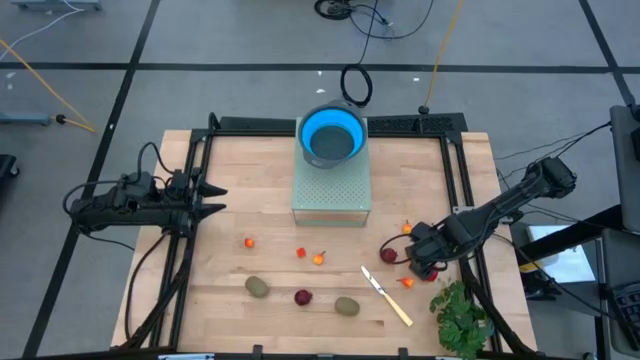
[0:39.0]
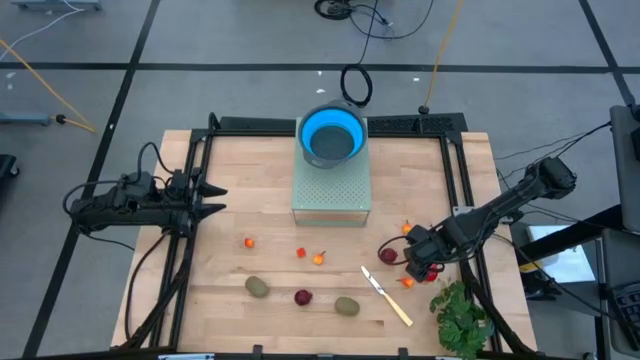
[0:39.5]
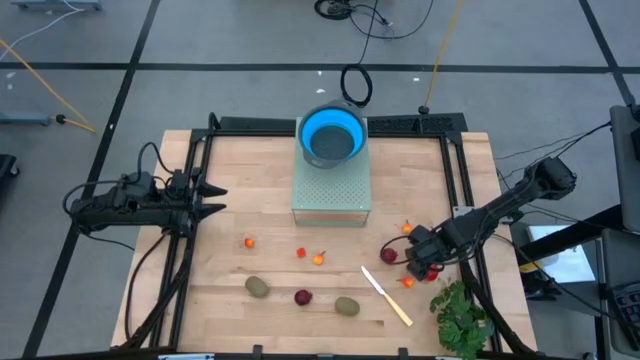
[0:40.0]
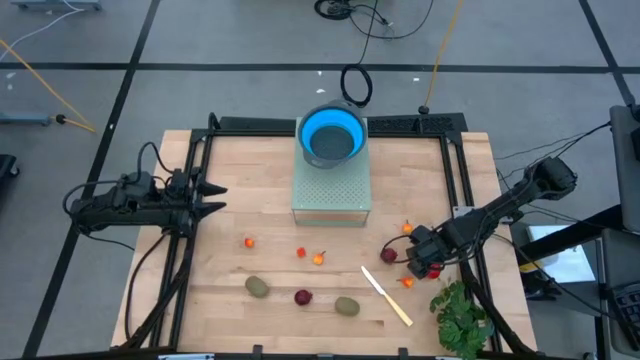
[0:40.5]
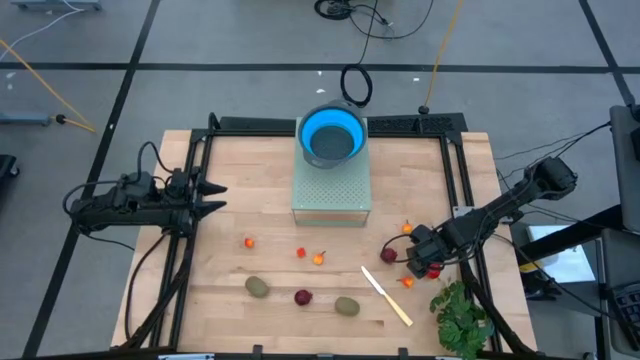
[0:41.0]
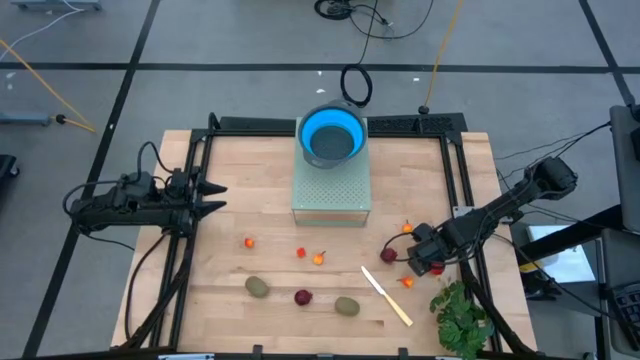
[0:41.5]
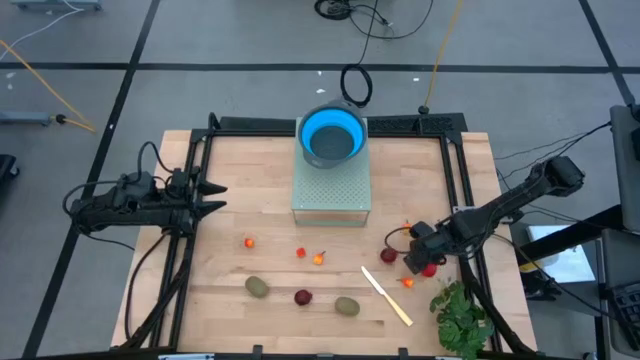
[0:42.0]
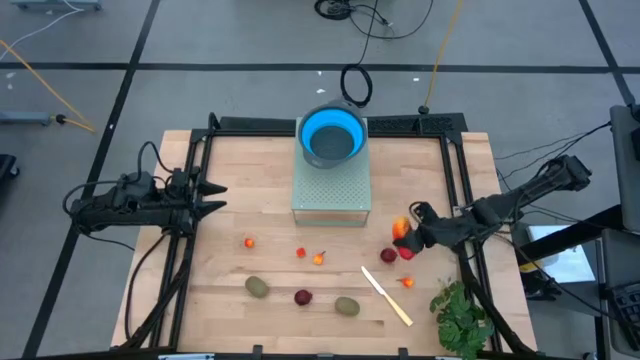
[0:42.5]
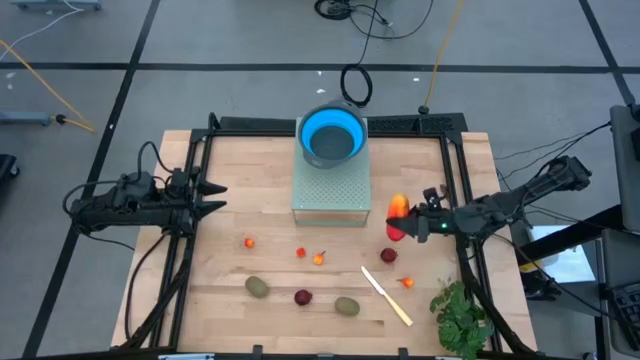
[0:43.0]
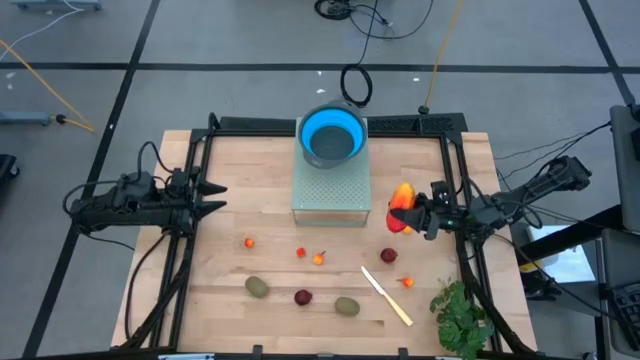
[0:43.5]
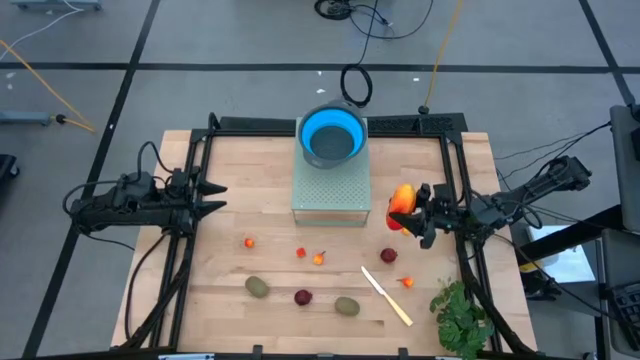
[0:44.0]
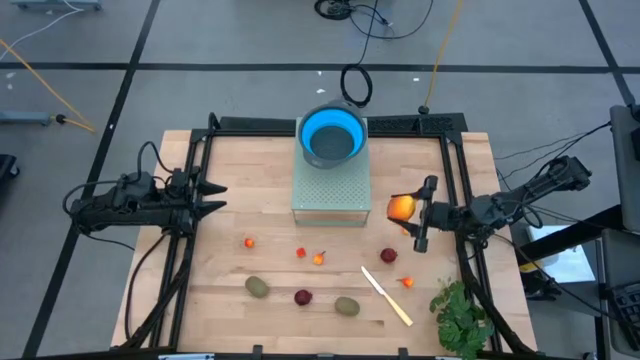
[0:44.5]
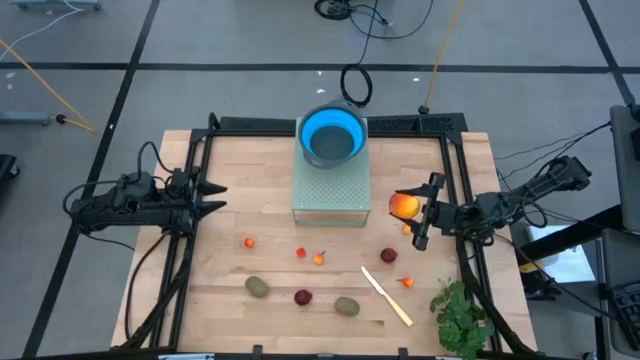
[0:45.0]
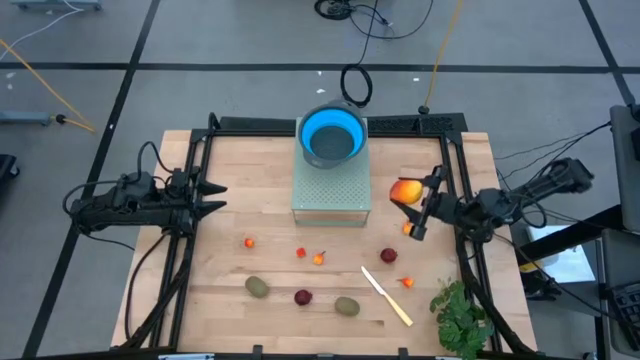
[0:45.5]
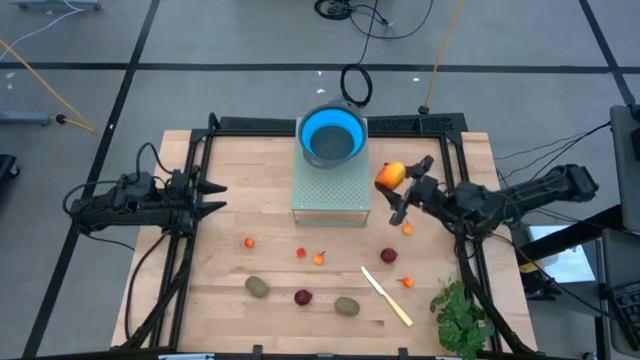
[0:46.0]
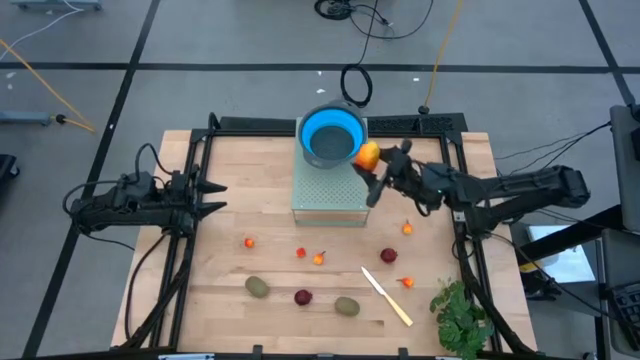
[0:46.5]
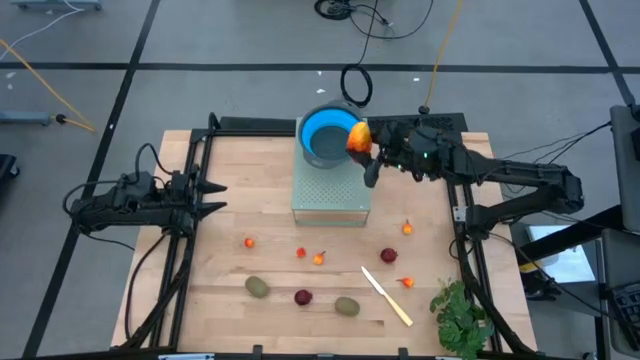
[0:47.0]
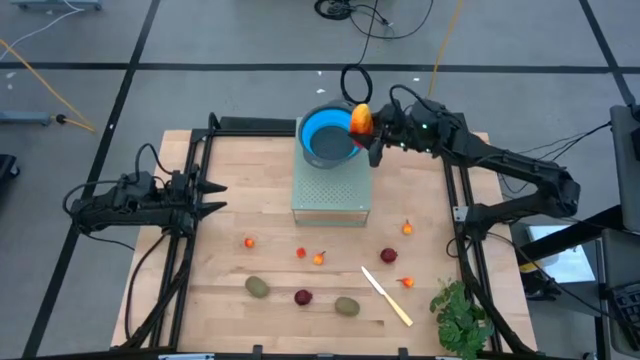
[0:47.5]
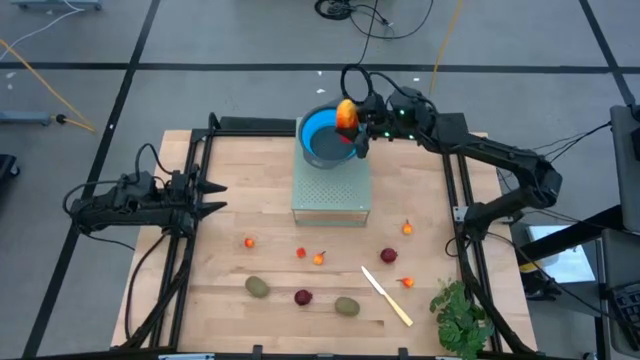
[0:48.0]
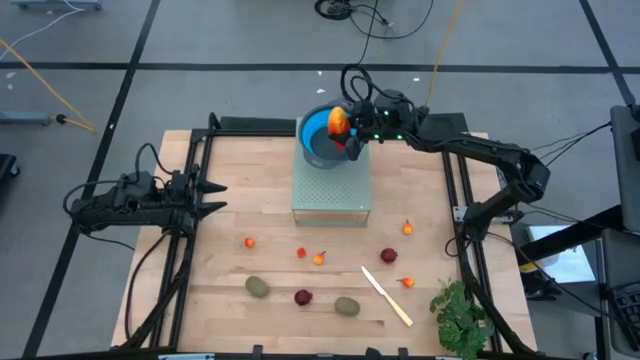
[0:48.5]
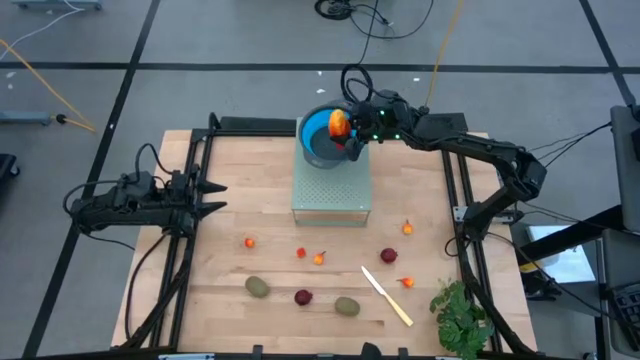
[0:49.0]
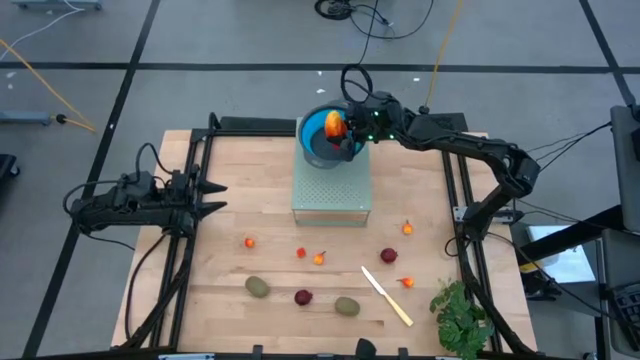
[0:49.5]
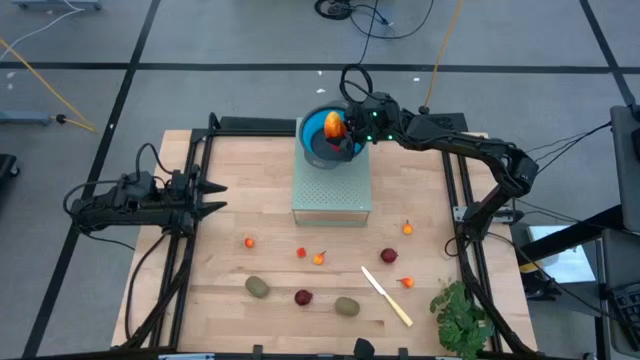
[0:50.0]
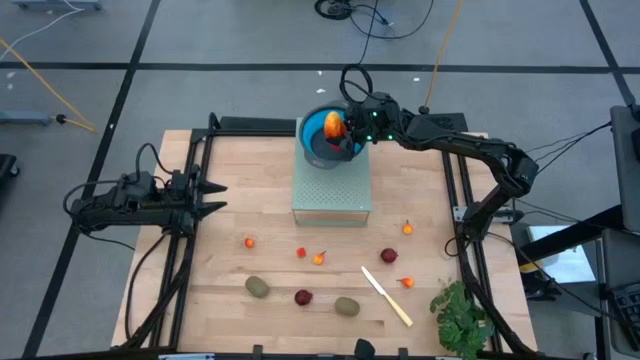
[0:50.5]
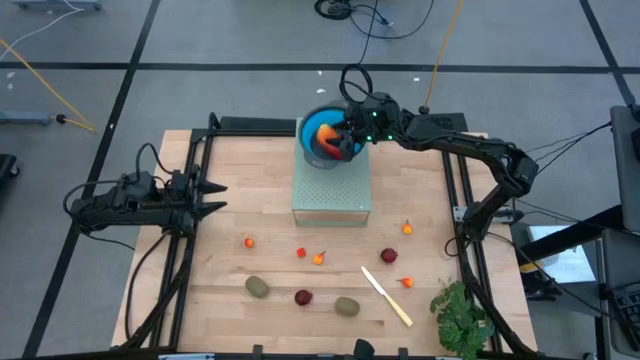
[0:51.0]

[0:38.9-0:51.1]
Task: Pick & Place Fruit
Put the yellow mango into the blue strainer bowl on the shelf

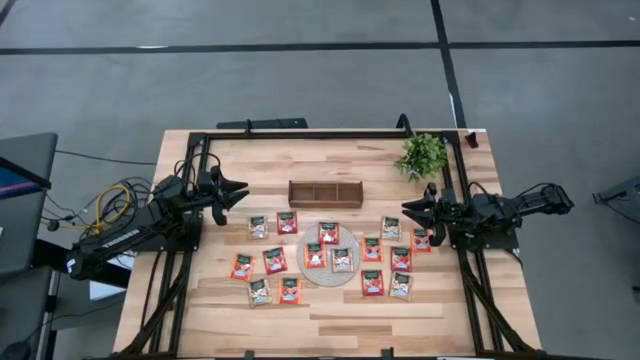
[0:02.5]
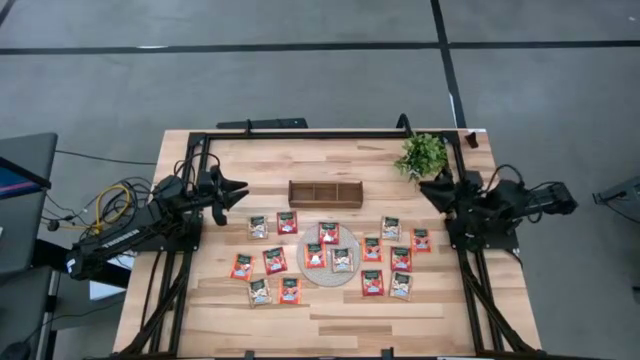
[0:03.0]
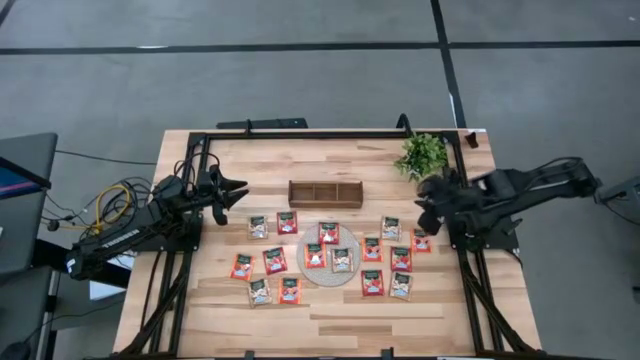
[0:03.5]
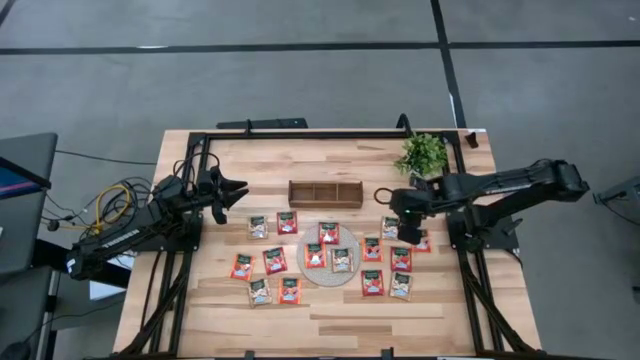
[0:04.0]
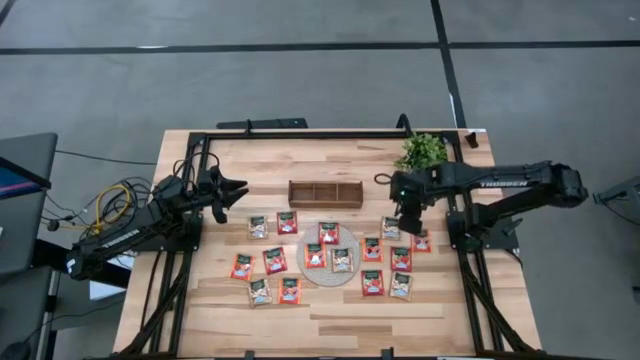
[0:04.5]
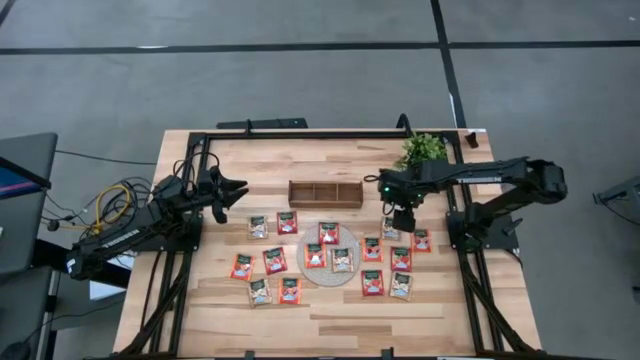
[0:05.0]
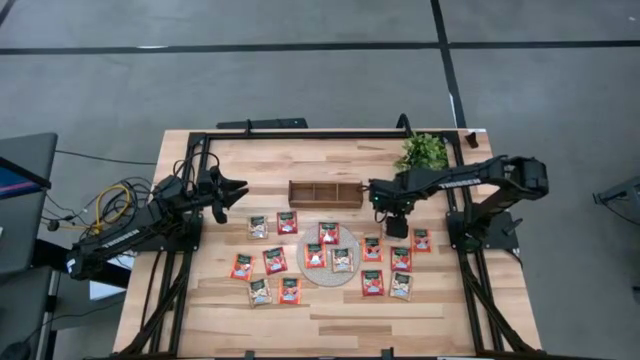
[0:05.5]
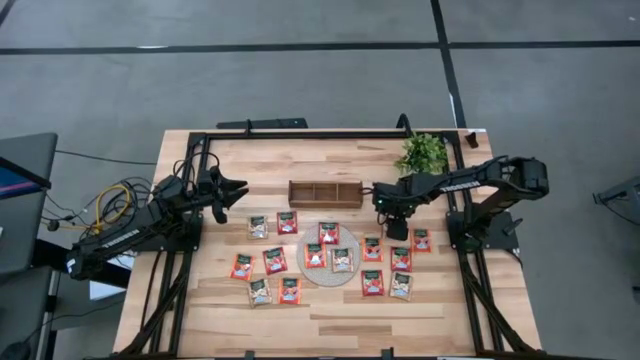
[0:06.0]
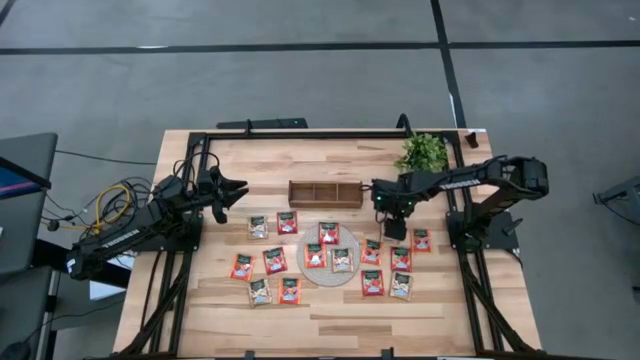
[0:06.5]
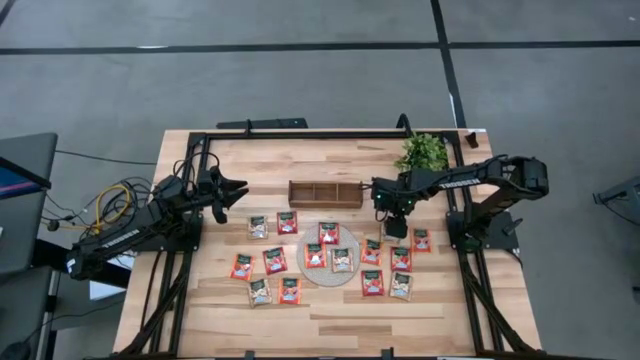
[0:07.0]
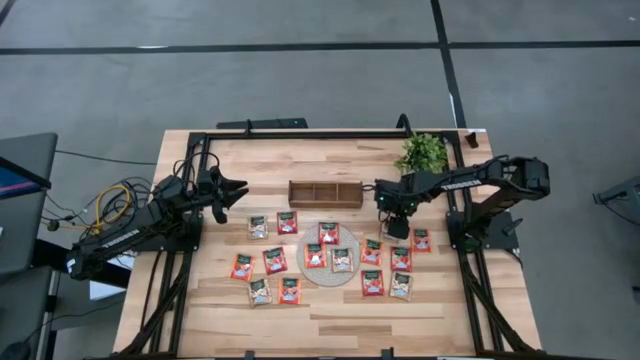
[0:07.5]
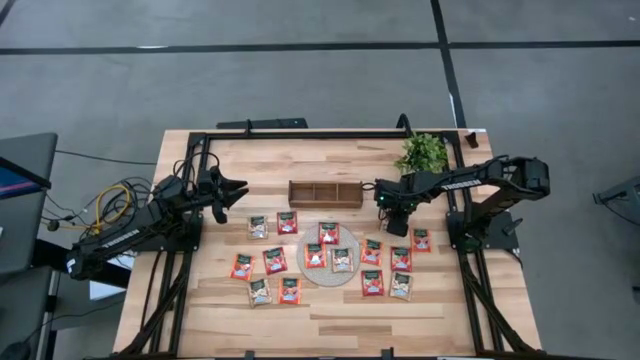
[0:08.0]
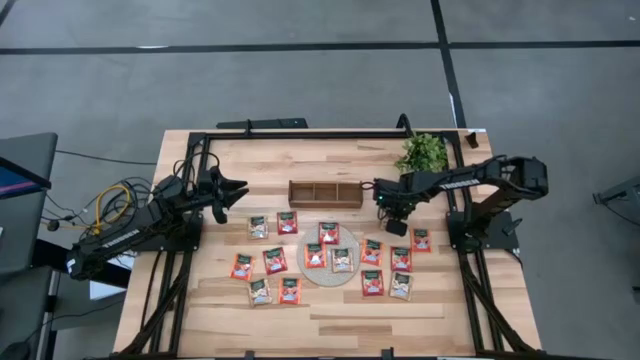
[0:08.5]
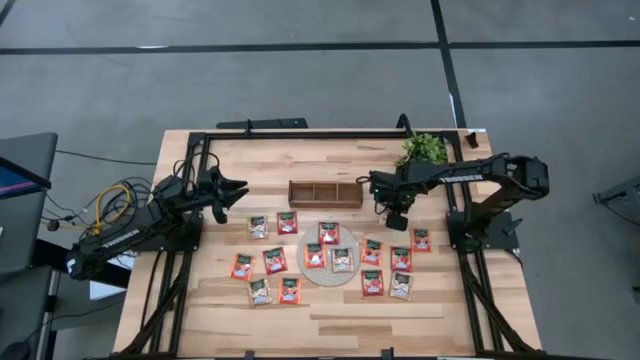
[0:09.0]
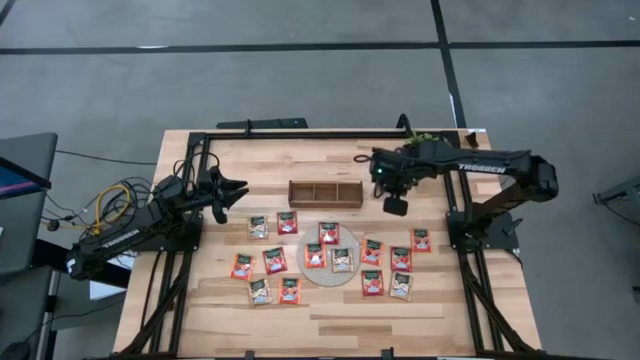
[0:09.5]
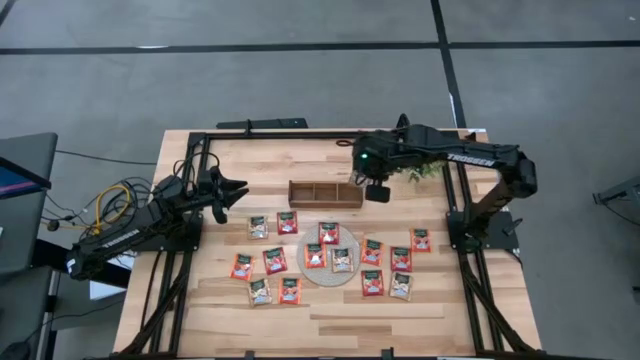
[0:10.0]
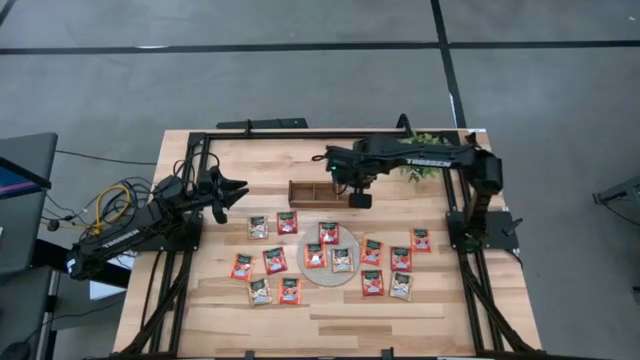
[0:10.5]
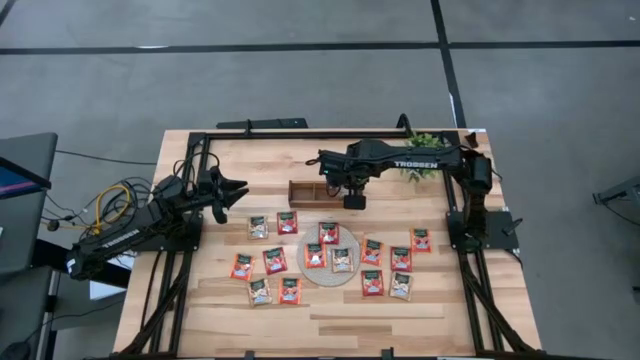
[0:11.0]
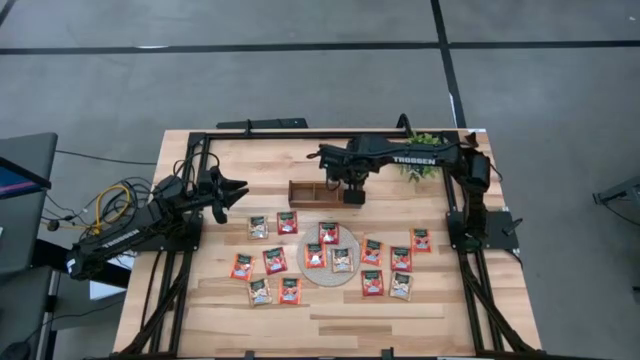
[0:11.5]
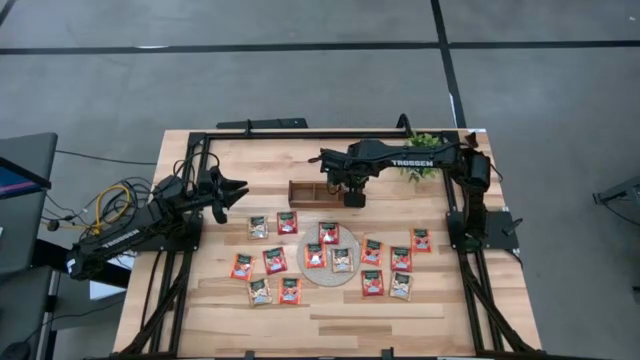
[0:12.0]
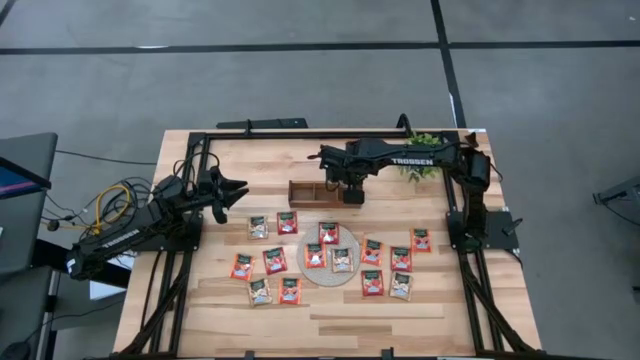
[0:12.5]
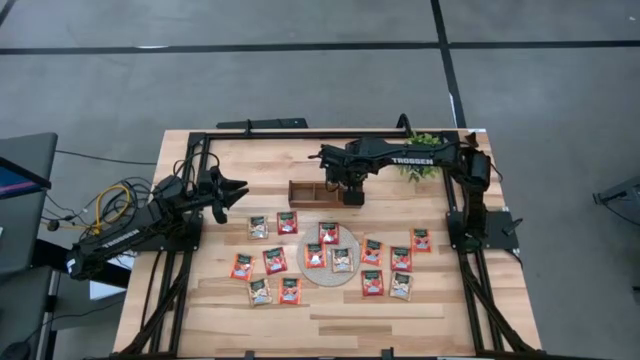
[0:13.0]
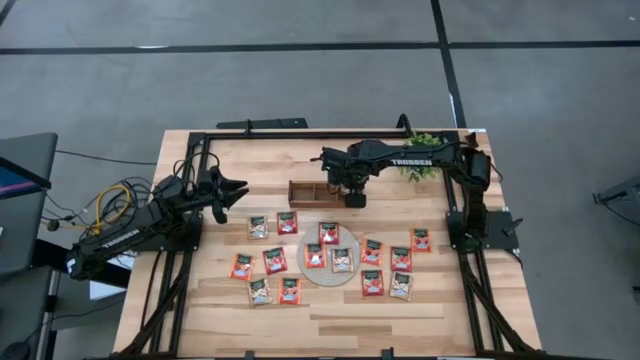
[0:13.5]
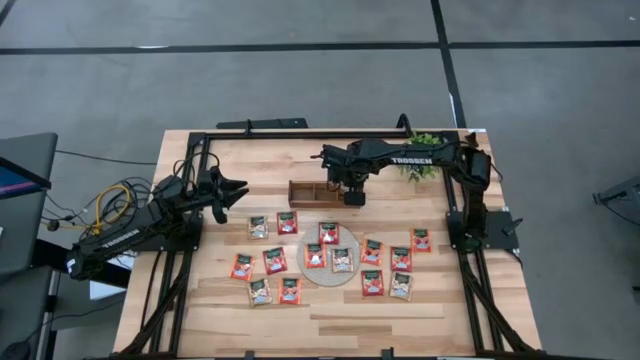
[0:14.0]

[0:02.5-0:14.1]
Task: Pick & Place Tea
Put the brown tea bag into the right section of the wooden organizer
